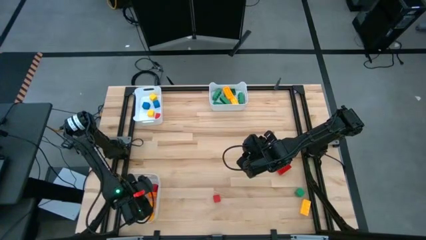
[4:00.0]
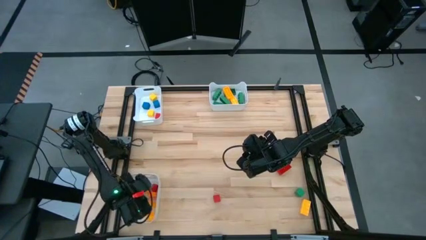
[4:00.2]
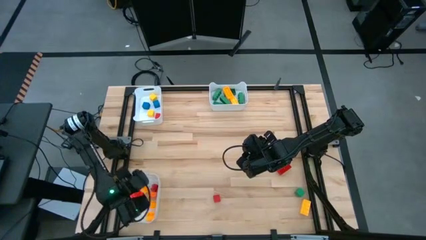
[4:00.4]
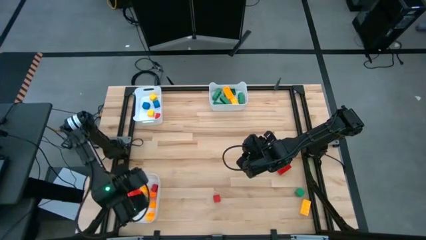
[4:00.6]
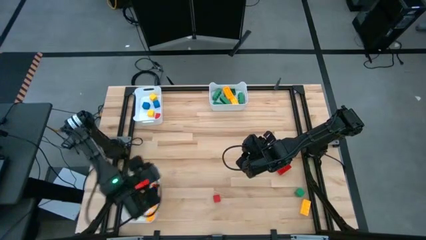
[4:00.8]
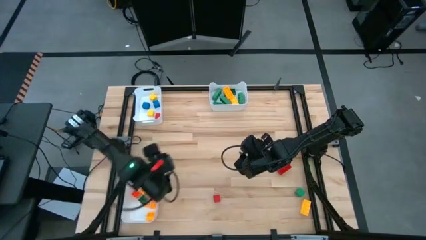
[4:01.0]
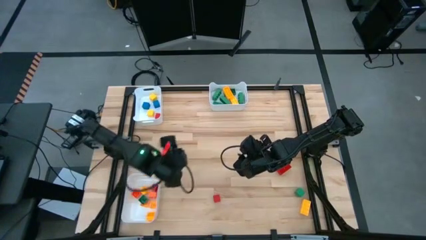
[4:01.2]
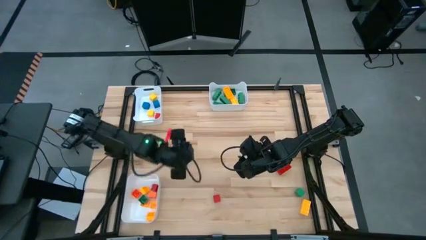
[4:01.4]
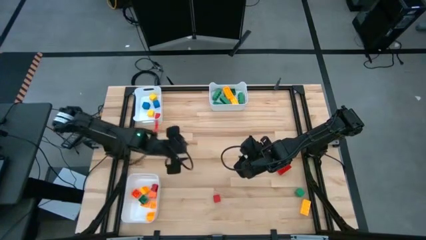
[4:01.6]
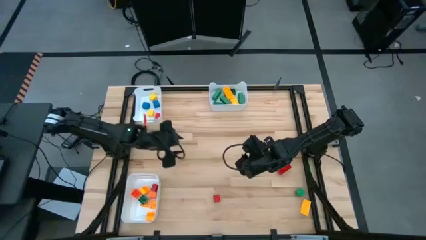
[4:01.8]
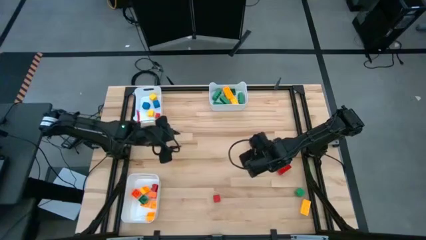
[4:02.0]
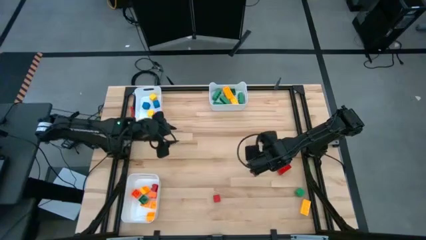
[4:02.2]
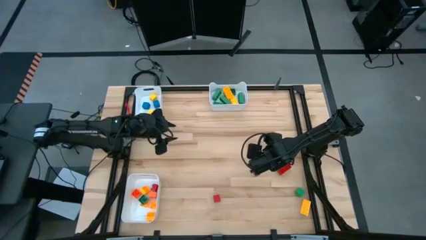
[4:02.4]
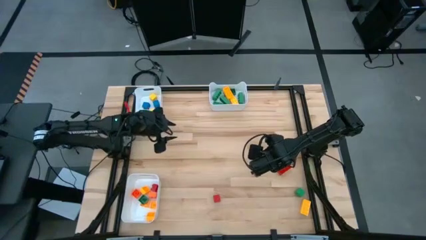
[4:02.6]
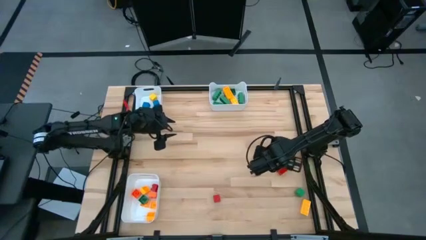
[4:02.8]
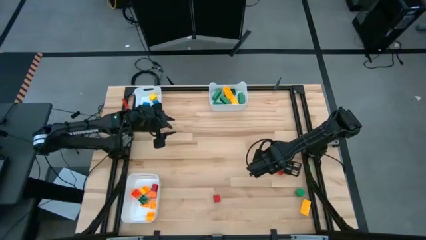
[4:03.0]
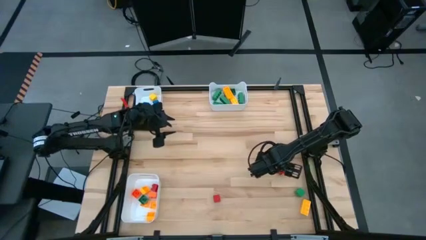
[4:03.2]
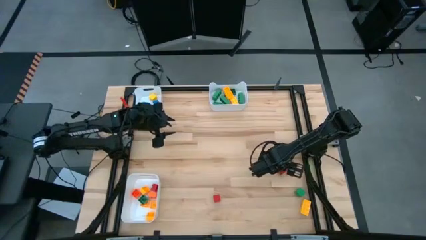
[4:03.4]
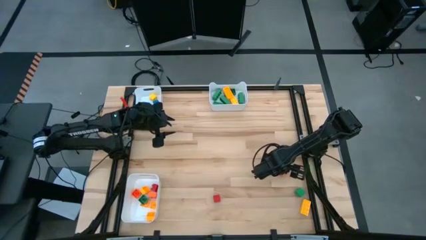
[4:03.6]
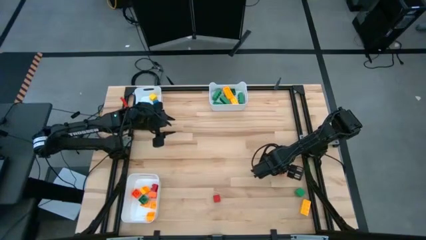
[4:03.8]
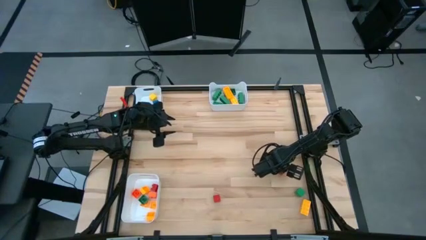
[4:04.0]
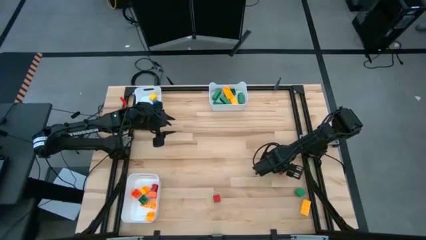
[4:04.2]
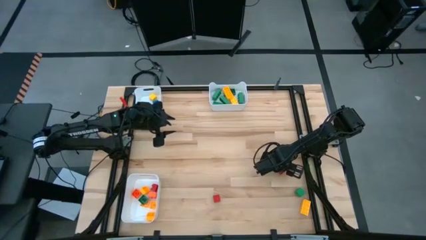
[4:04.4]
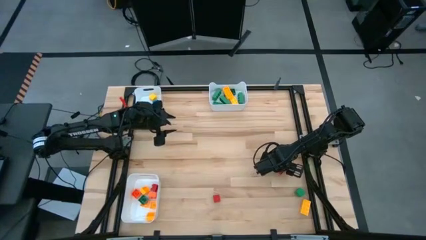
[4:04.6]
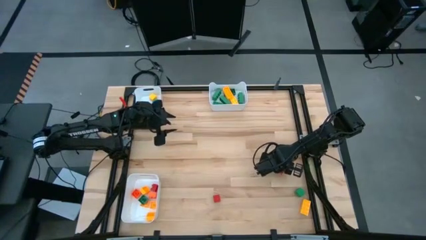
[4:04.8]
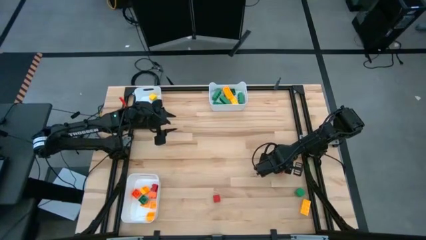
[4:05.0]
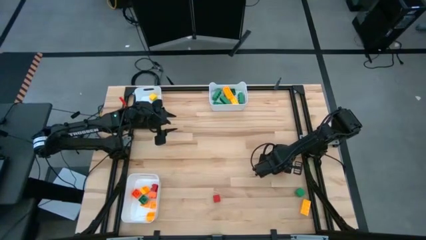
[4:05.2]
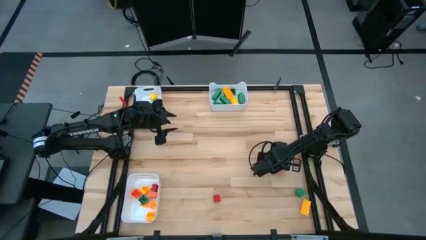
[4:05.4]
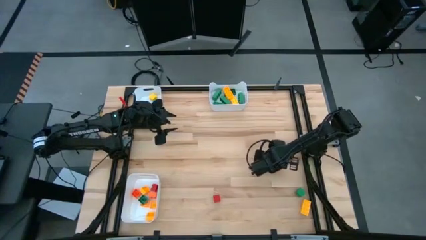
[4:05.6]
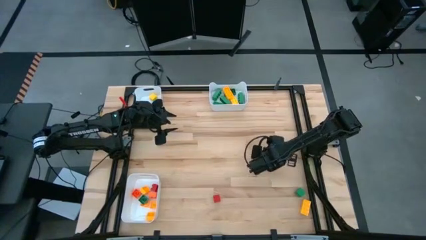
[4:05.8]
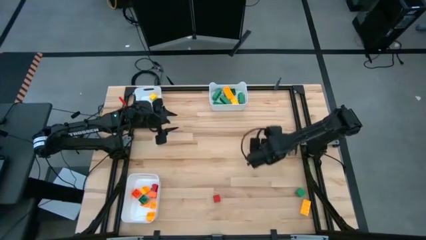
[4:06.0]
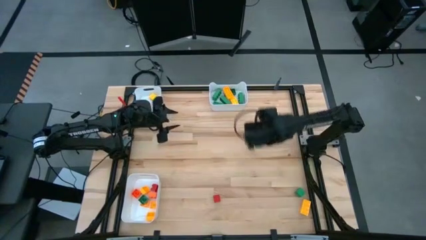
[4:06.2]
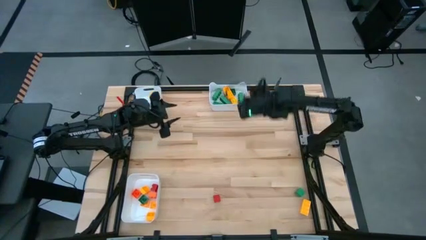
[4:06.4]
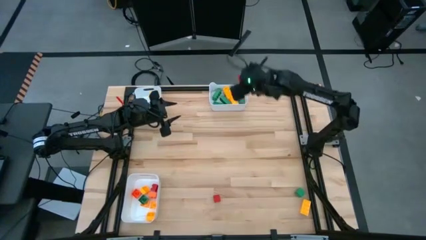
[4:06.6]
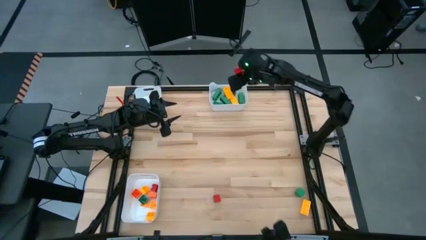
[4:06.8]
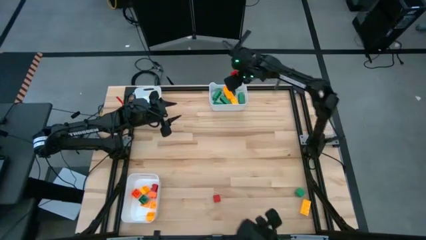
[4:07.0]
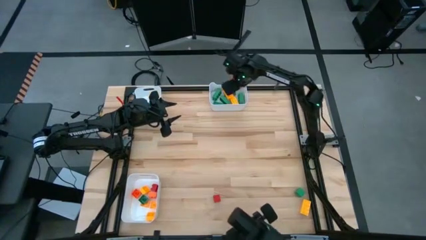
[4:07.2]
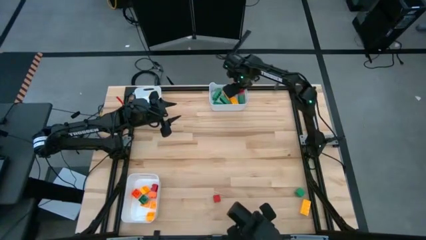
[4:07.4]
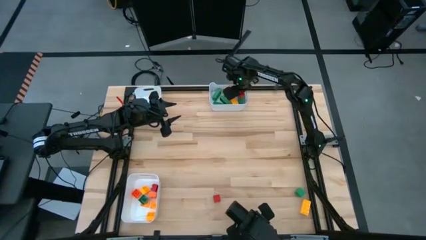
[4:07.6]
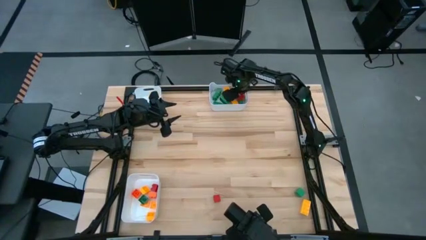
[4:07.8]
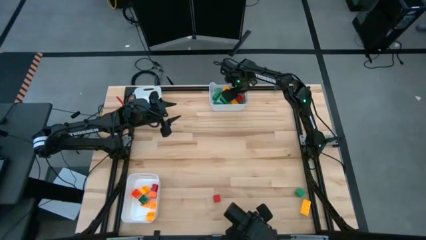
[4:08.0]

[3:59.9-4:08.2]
Task: Sort blocks by size
Put the red 8 stud game piece into the top right white bin

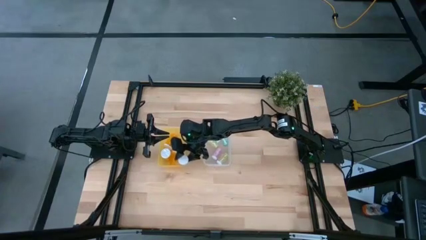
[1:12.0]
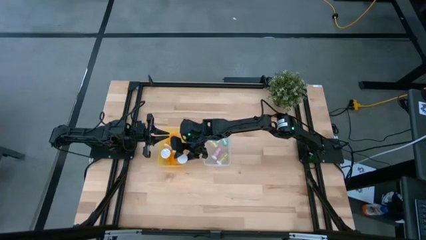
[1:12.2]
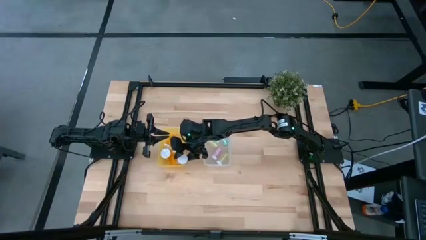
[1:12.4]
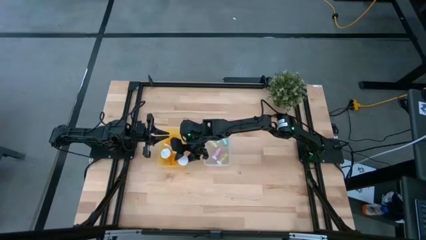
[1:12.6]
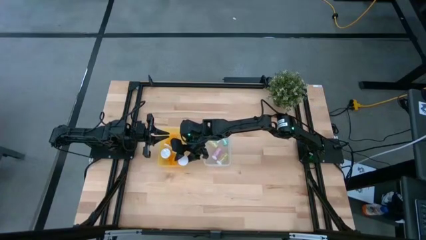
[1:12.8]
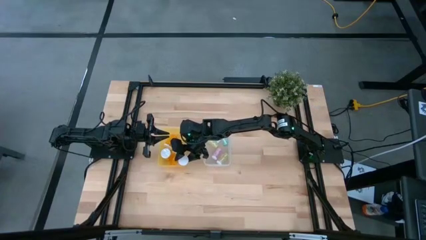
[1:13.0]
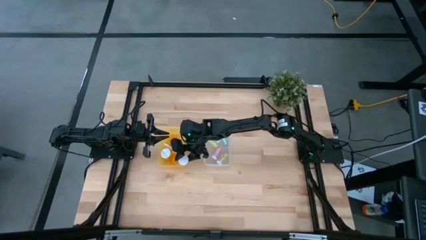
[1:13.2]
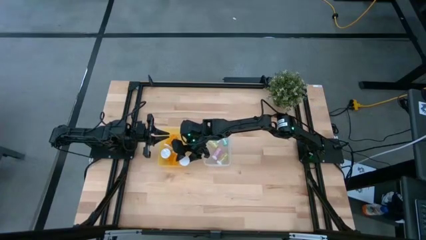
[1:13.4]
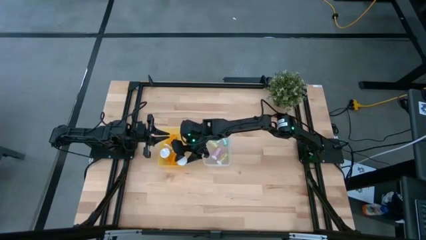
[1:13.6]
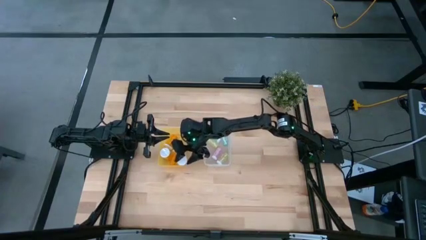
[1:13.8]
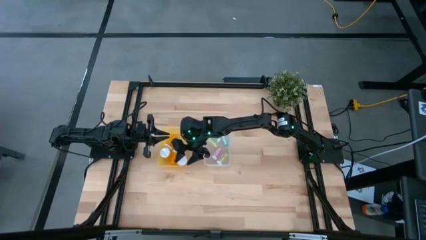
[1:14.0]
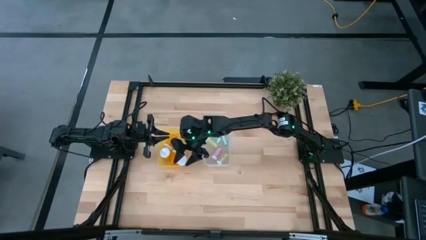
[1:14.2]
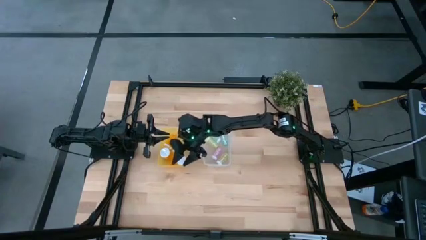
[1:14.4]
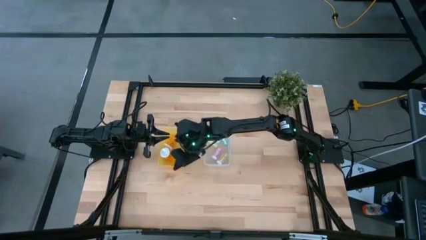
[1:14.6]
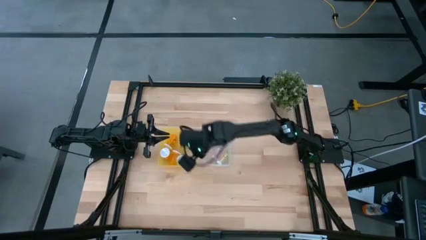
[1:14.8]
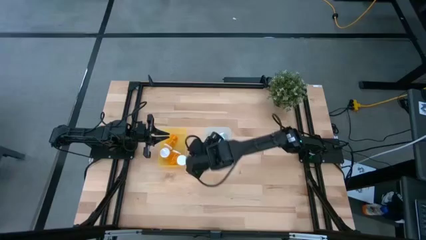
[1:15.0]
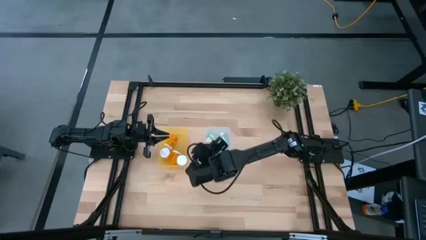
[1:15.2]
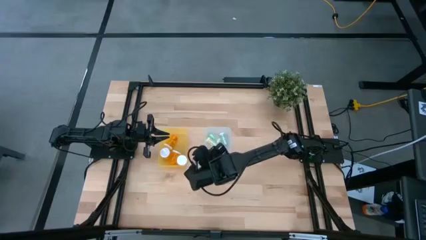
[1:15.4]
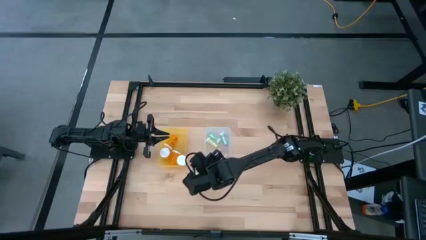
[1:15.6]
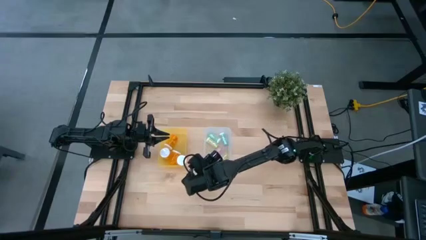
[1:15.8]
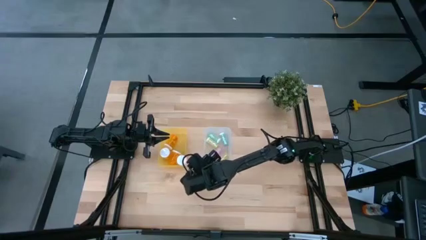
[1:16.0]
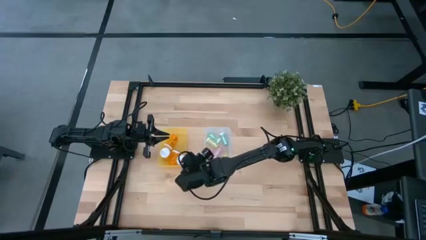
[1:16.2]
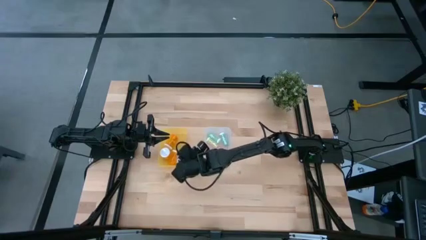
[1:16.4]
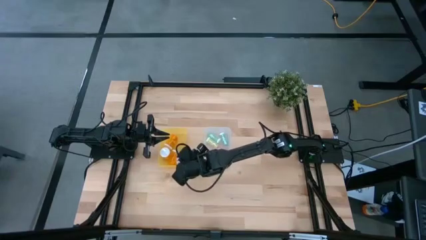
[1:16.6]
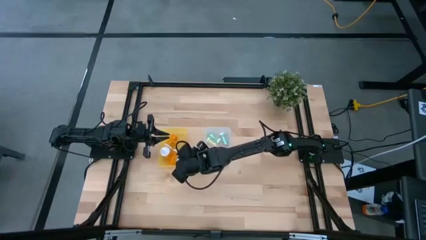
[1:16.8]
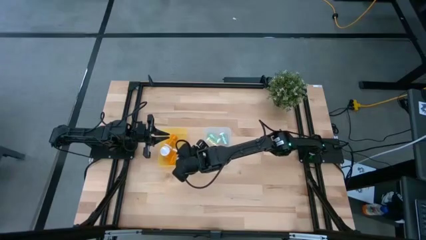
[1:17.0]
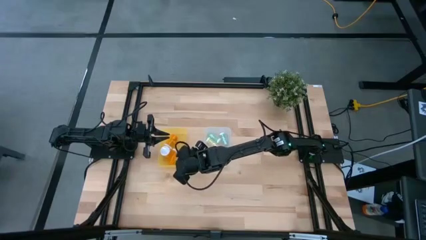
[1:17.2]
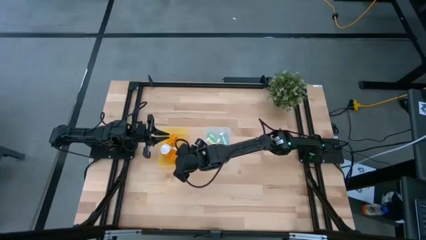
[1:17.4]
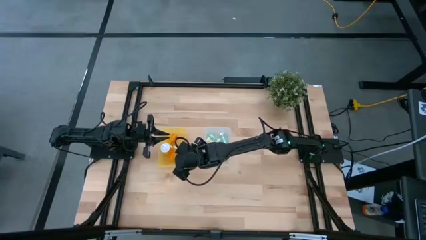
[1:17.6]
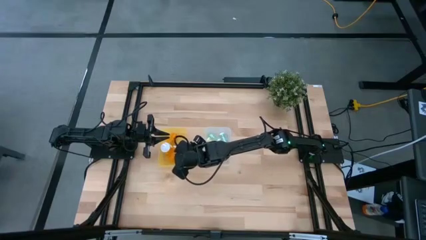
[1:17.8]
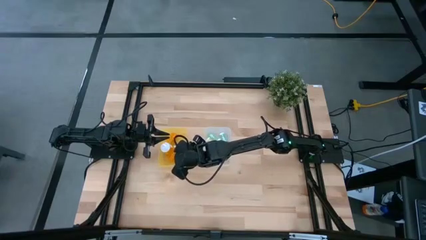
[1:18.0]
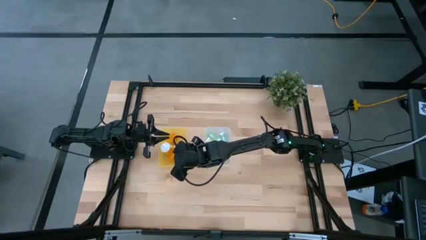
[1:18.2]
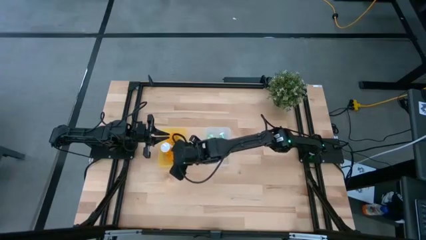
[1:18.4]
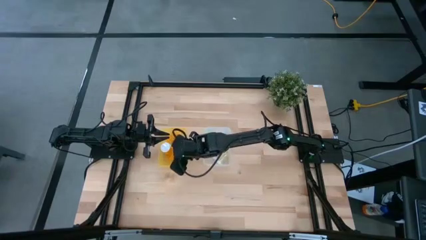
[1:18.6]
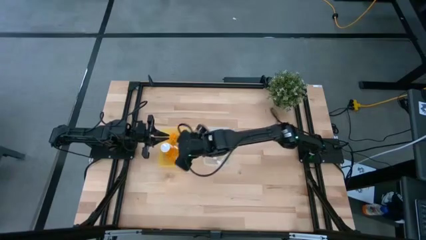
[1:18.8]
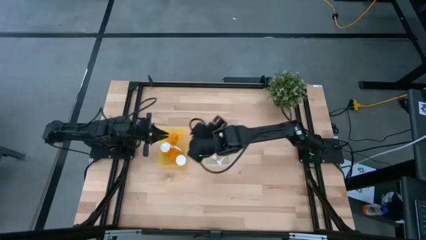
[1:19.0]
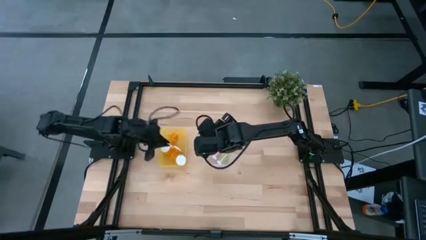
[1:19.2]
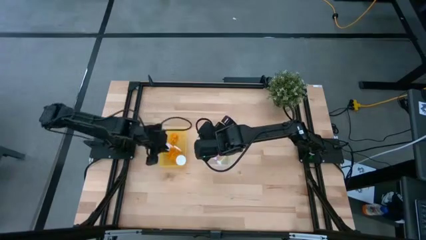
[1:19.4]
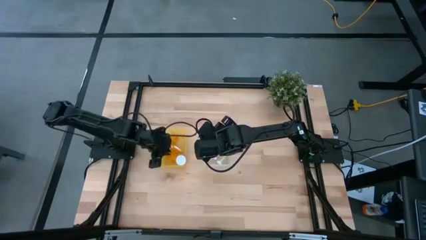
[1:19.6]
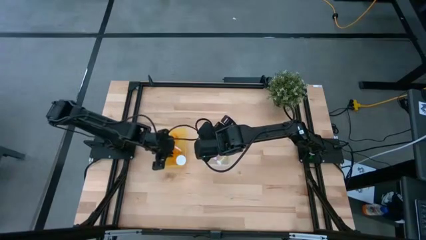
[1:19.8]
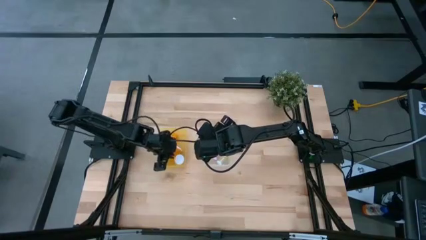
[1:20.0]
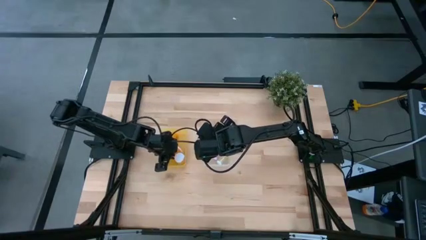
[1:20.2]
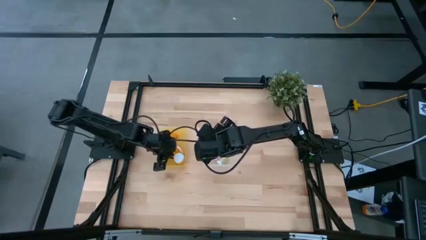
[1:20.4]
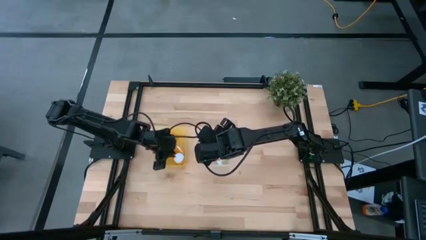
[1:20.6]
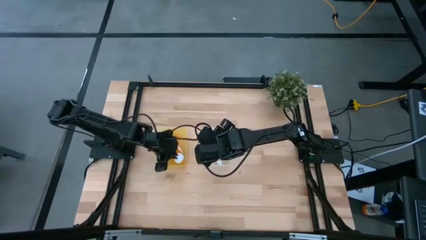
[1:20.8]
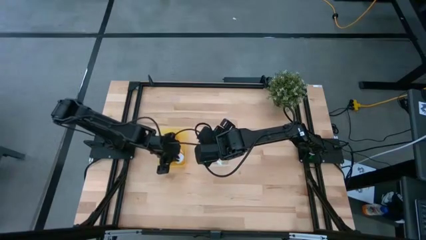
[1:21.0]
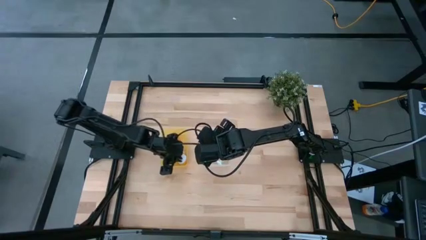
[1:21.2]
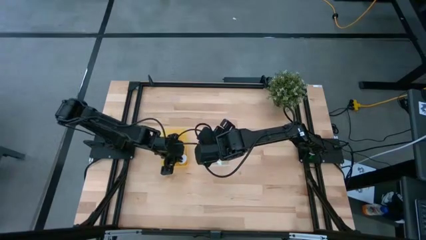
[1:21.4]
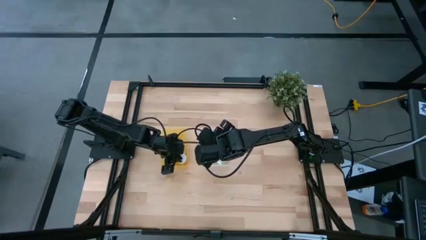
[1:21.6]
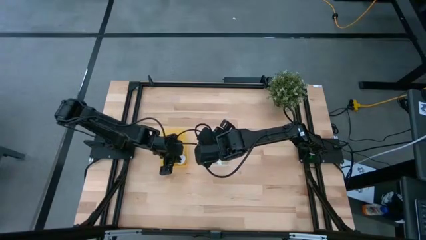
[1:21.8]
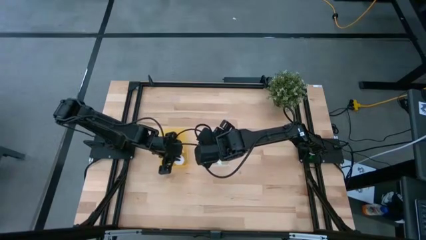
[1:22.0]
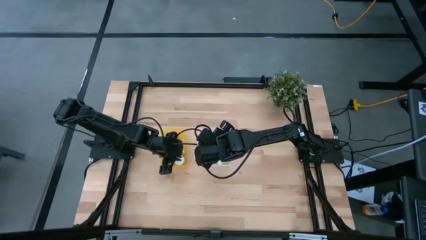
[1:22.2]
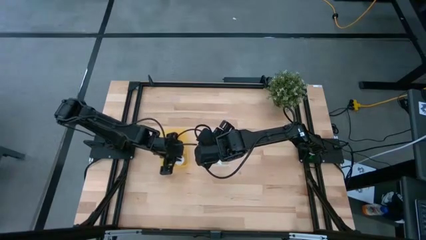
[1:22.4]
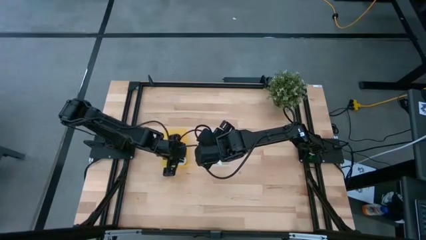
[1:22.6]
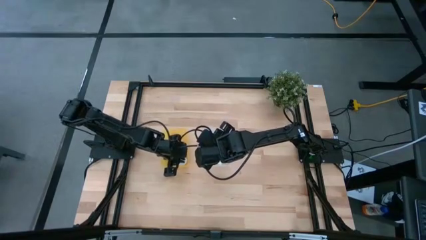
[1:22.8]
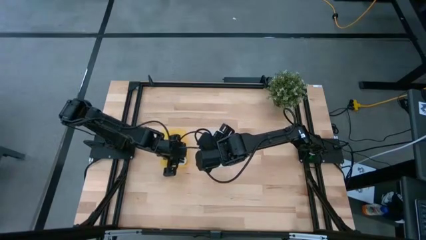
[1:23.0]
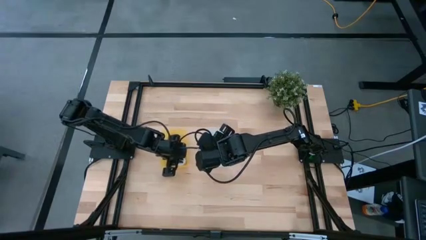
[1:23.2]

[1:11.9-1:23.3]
Task: Pick and place medicine bottles into bin by pill shape (circle, oval)
Put the orange pill bottle into the yellow bin
